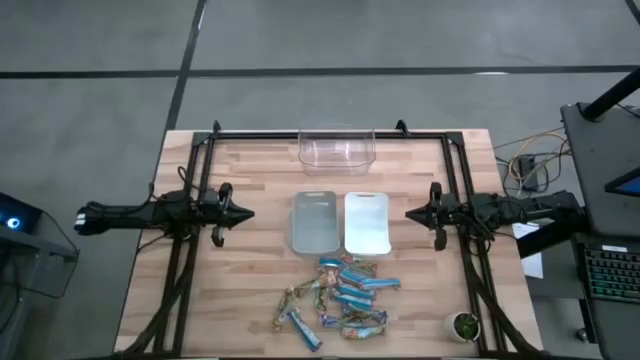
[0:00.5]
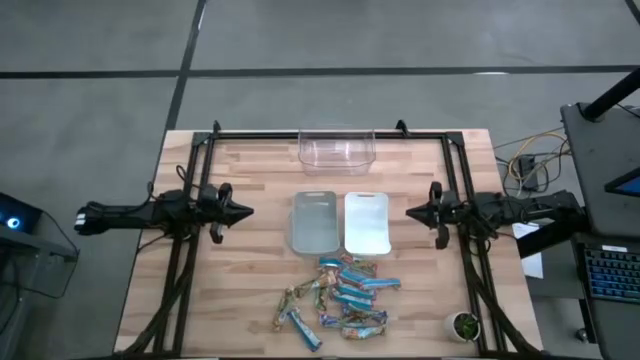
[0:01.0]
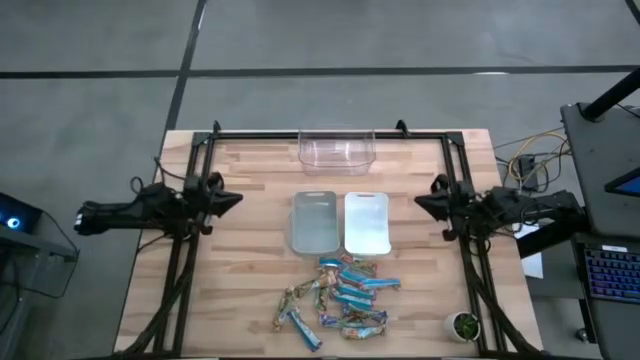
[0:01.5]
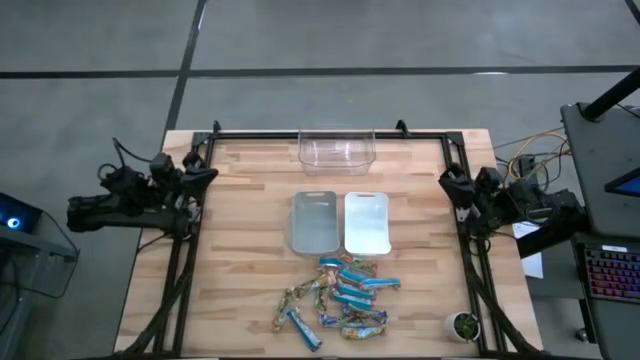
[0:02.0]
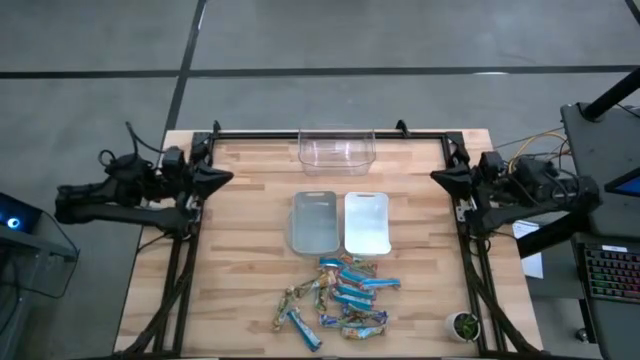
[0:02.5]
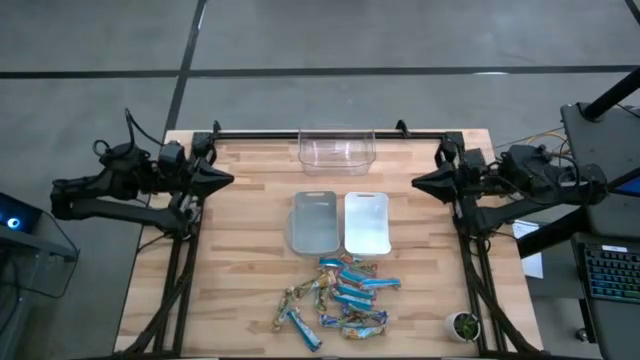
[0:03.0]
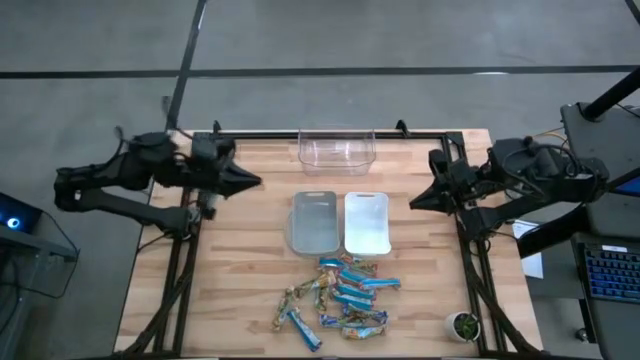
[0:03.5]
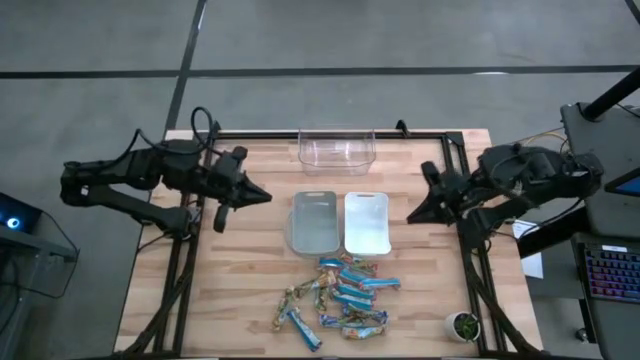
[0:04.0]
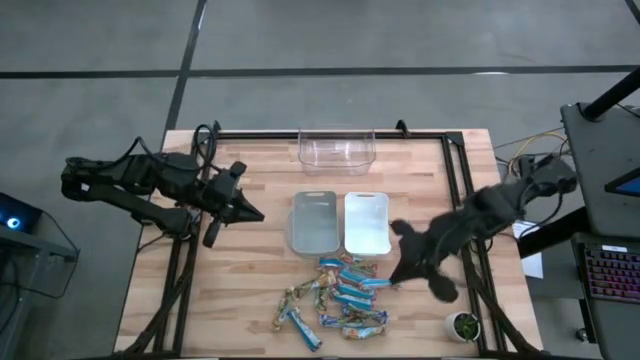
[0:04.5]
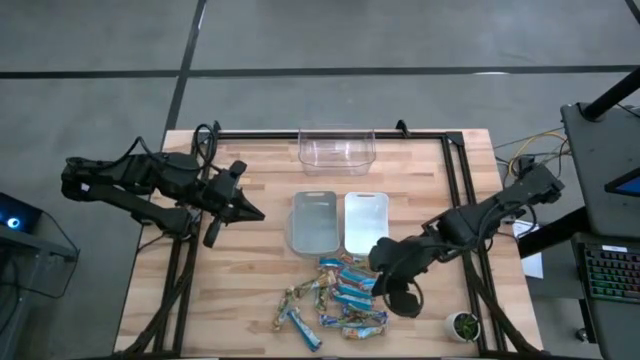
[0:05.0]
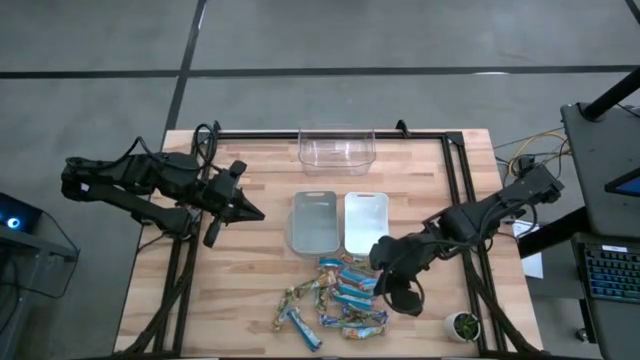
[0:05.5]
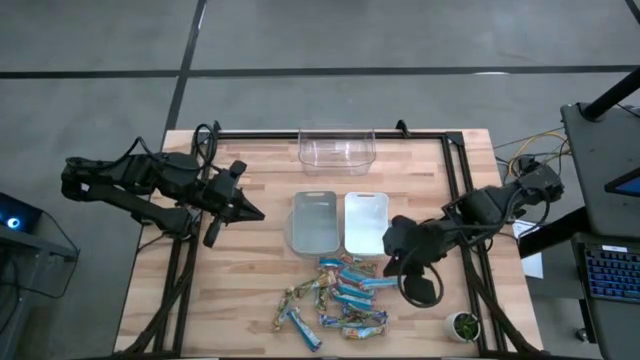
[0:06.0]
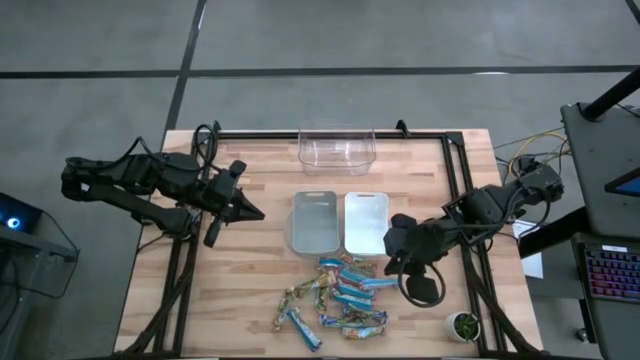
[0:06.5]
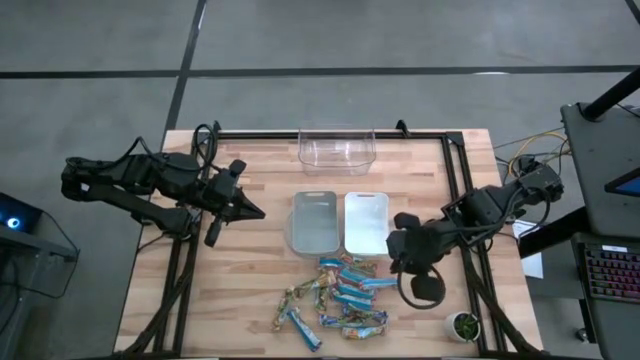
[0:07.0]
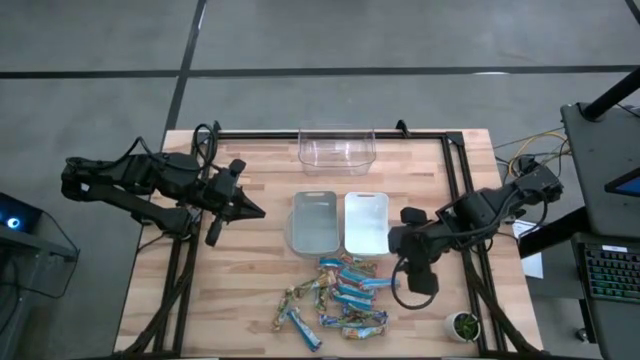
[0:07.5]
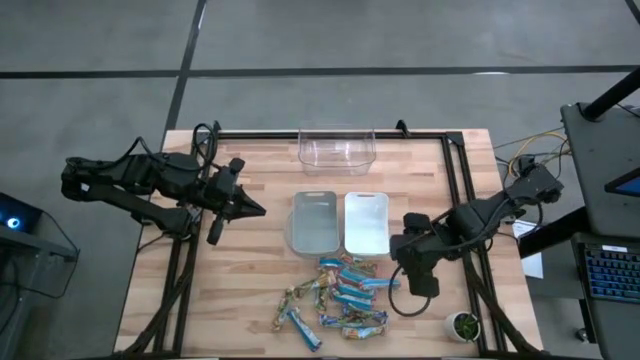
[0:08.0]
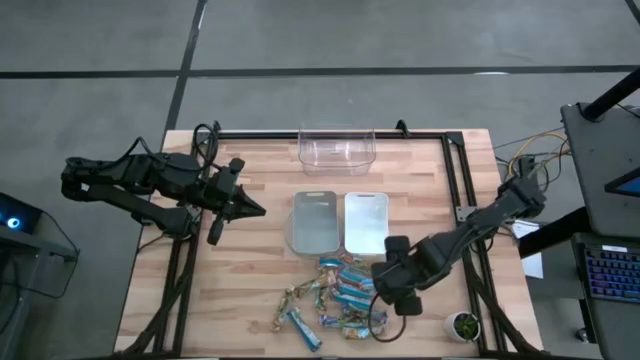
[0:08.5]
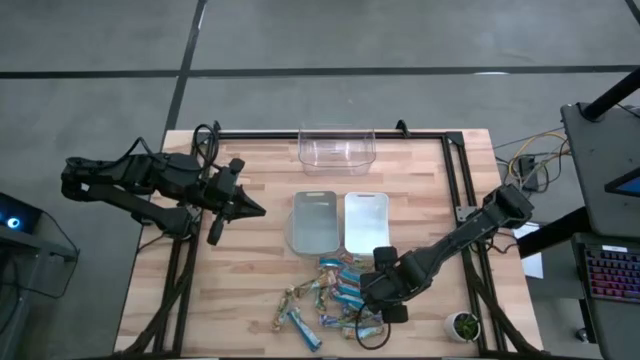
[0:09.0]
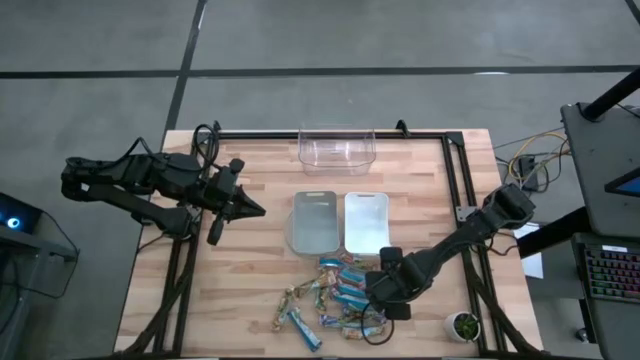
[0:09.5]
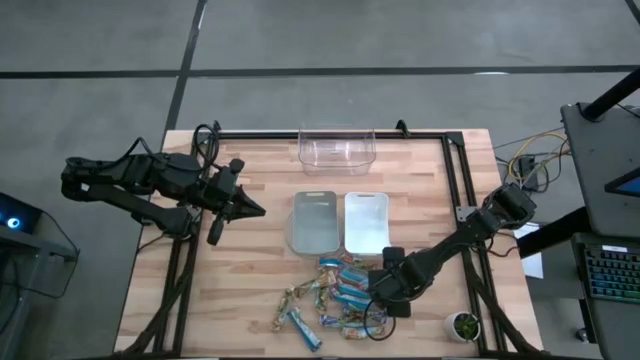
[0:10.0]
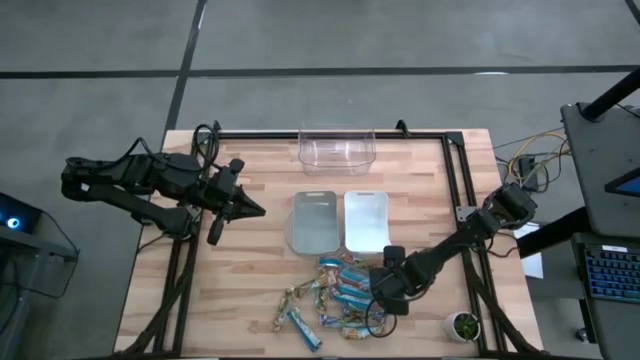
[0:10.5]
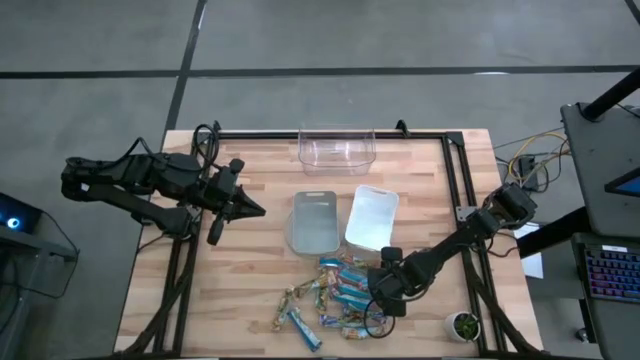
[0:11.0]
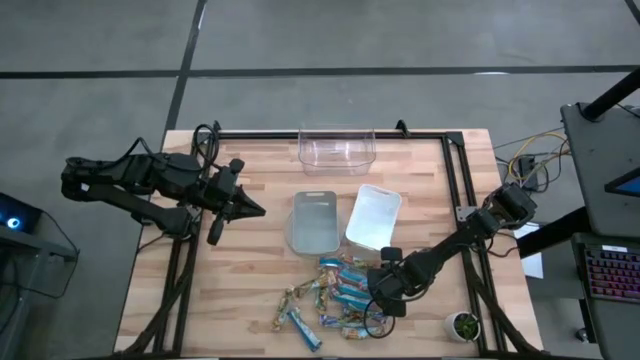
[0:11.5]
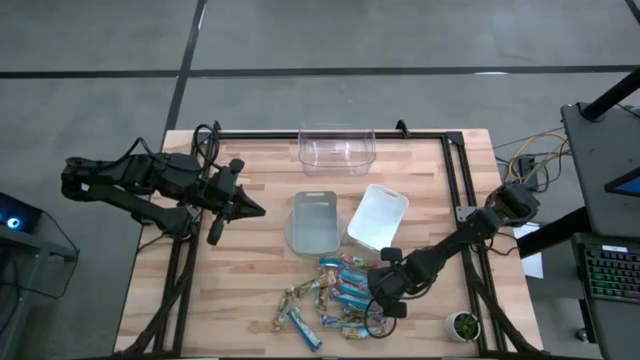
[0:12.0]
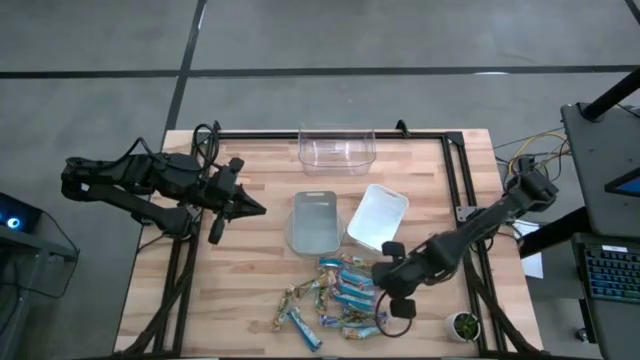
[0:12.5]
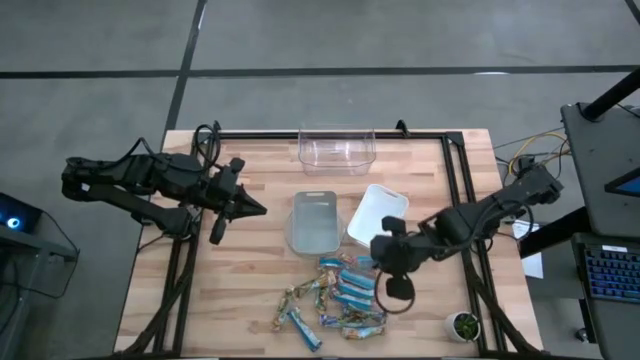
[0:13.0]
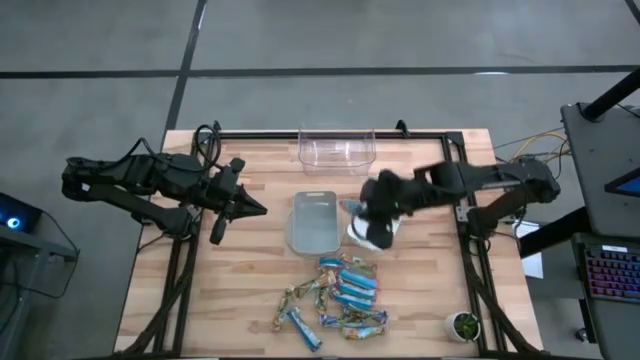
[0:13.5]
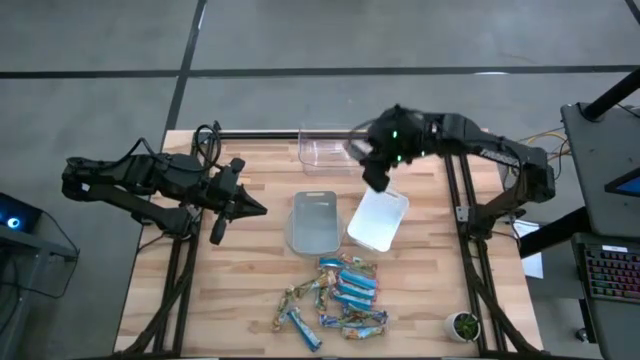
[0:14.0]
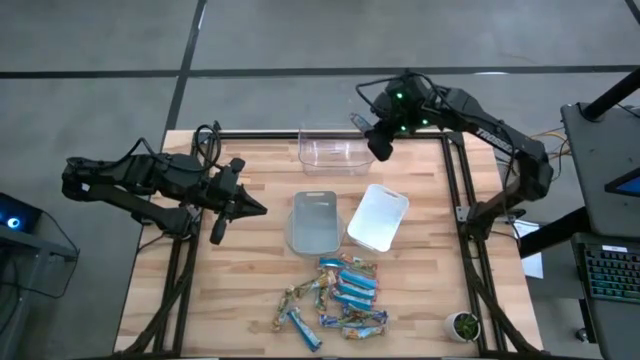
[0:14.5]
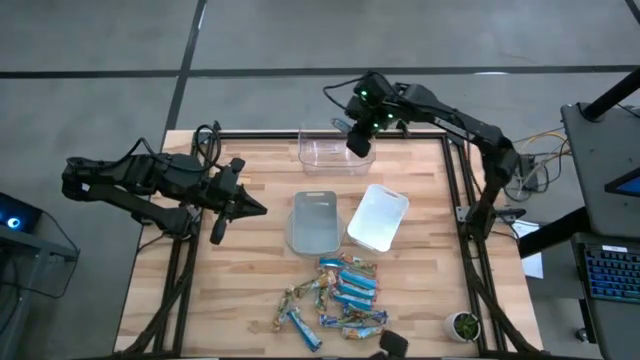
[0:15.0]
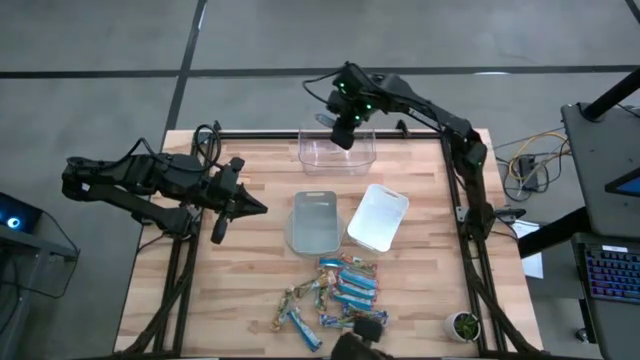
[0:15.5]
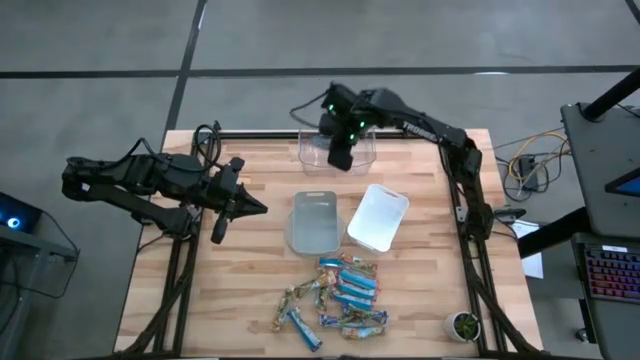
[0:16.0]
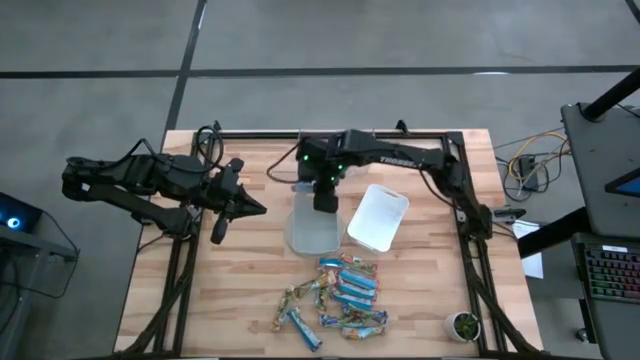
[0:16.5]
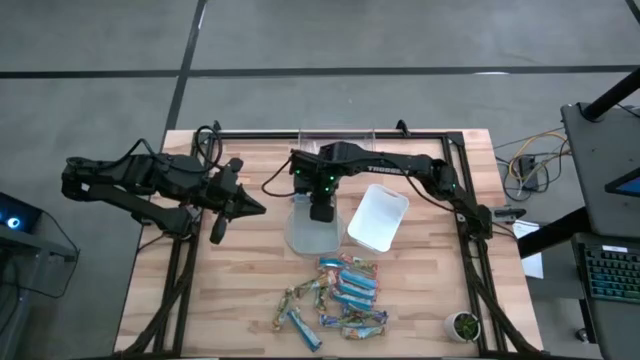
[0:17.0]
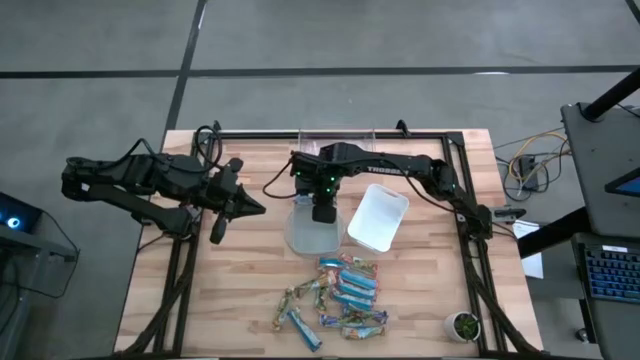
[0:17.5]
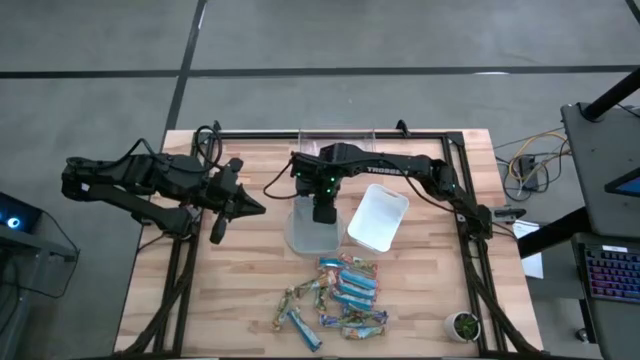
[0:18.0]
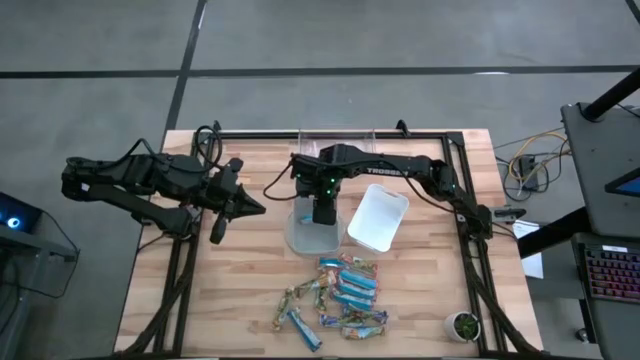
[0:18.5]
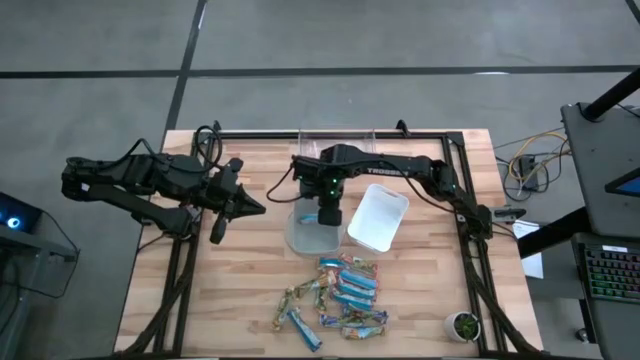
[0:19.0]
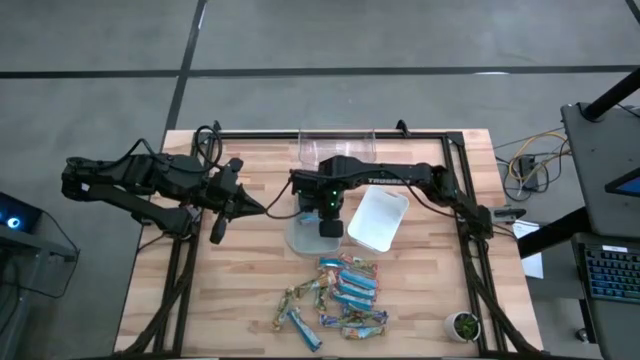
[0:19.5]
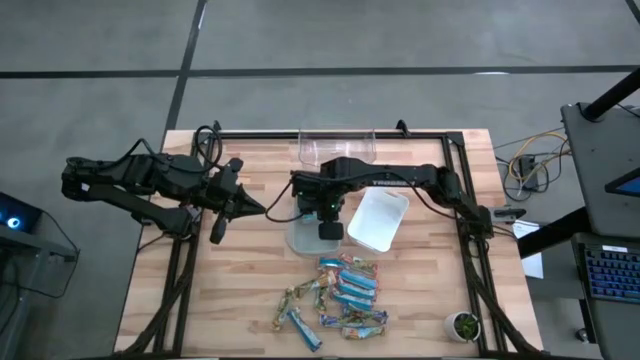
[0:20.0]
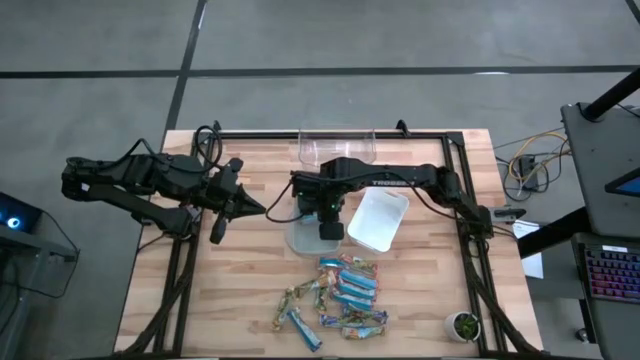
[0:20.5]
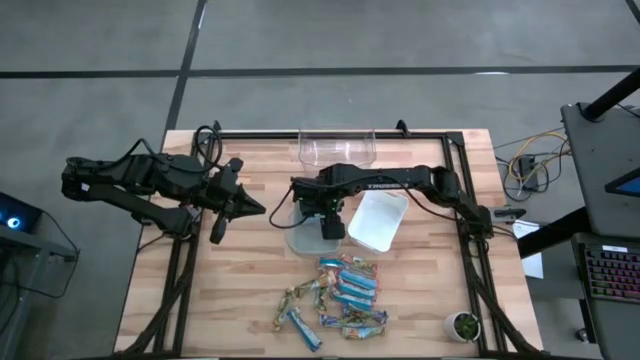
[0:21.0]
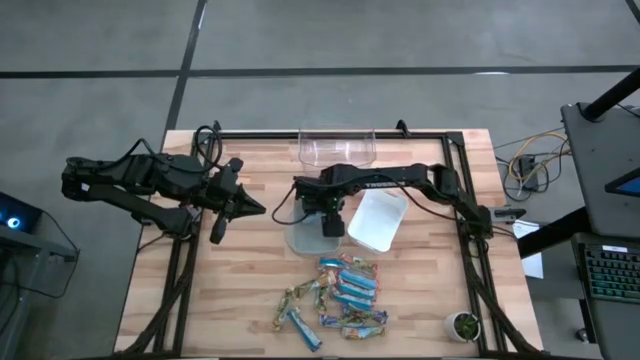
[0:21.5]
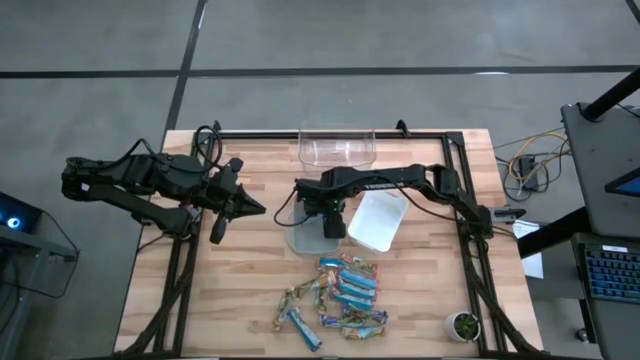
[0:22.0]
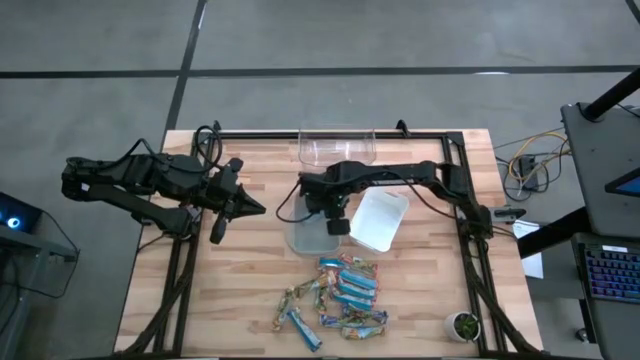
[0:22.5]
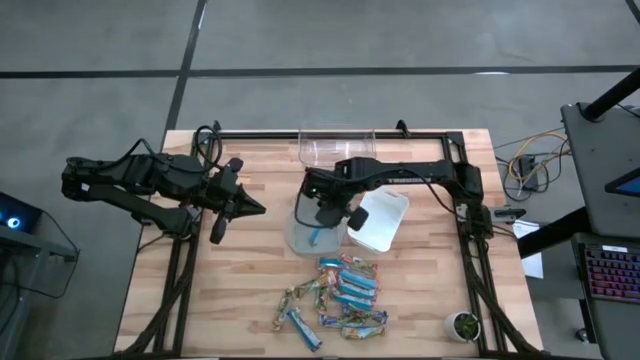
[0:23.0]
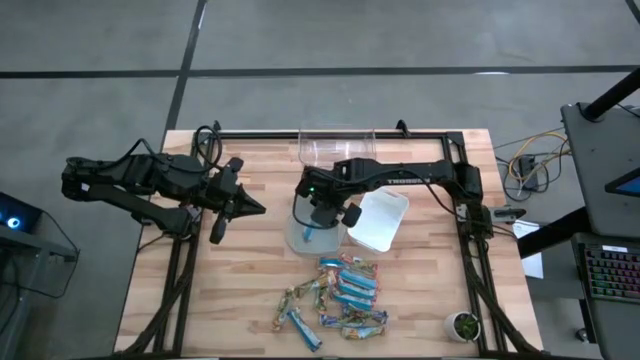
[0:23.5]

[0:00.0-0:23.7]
Task: Pick and place Granola Bars by type
Put the red granola bar into the gray bin
